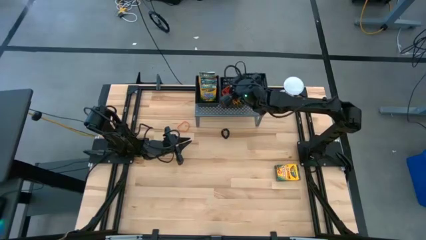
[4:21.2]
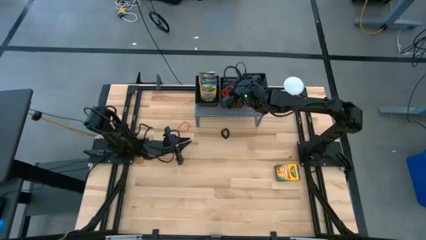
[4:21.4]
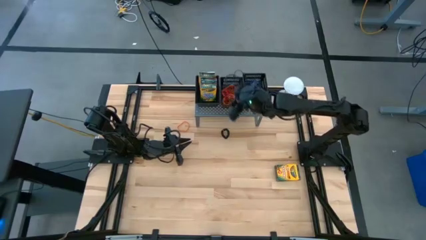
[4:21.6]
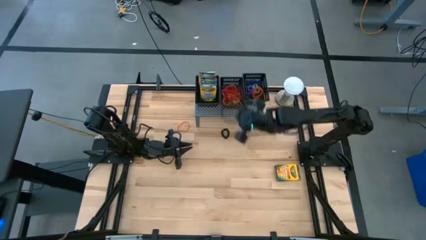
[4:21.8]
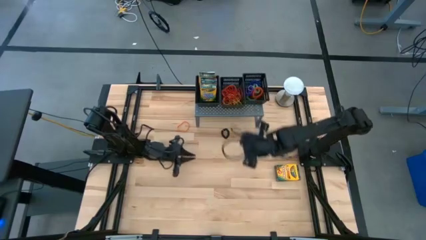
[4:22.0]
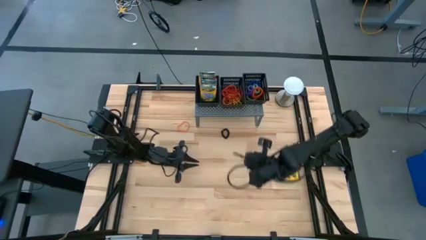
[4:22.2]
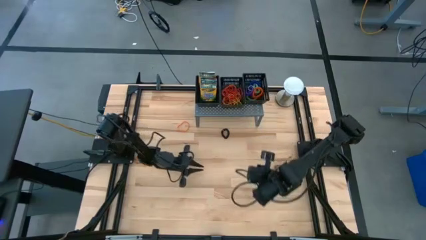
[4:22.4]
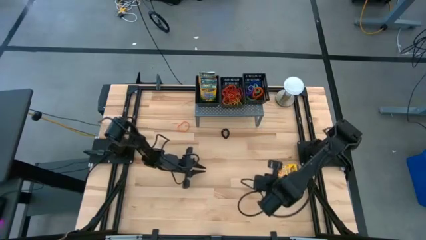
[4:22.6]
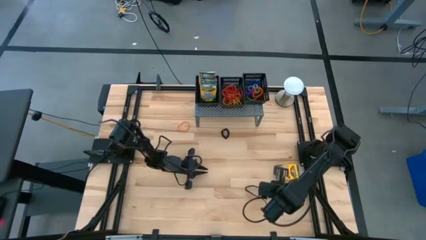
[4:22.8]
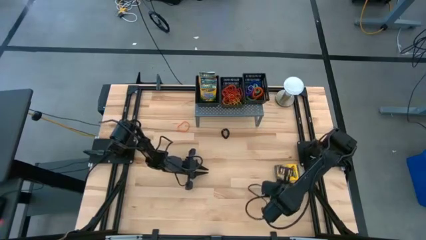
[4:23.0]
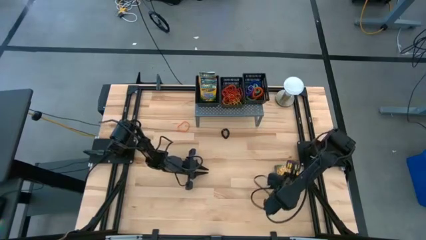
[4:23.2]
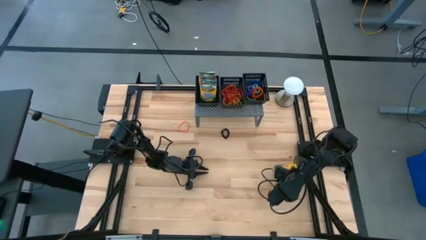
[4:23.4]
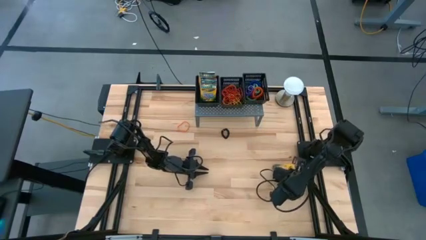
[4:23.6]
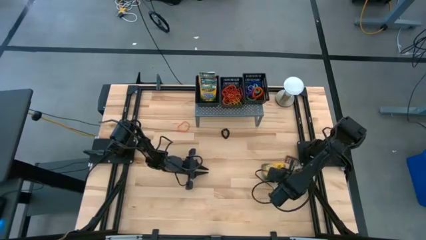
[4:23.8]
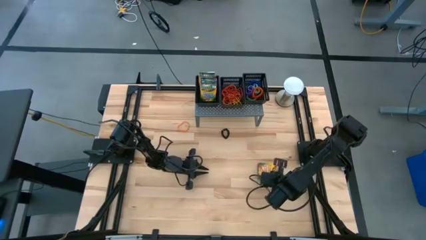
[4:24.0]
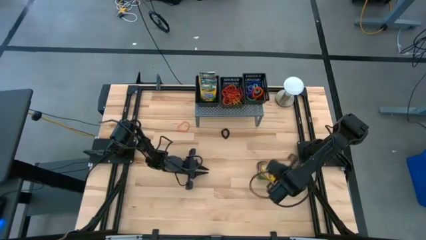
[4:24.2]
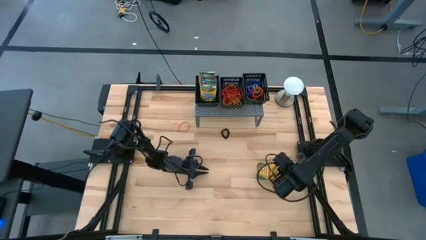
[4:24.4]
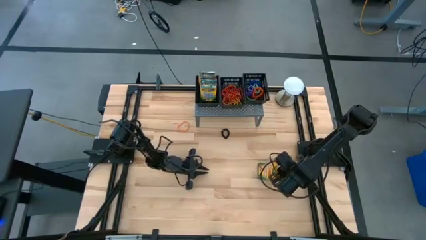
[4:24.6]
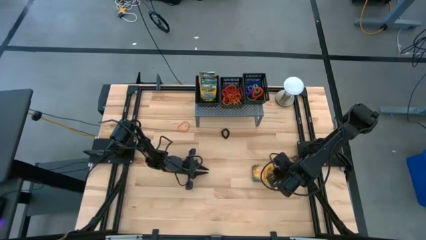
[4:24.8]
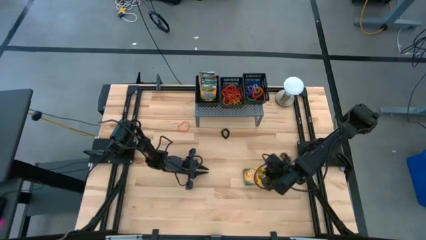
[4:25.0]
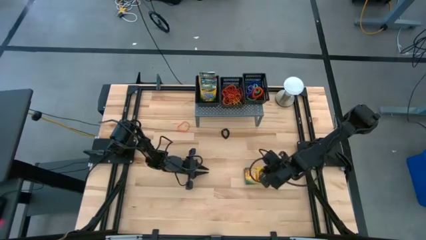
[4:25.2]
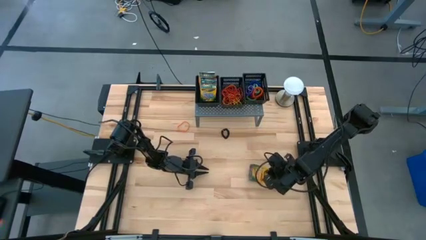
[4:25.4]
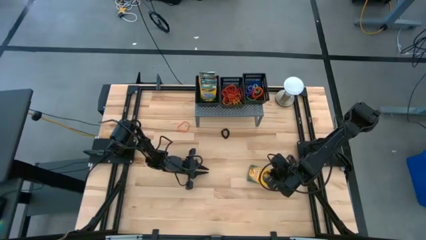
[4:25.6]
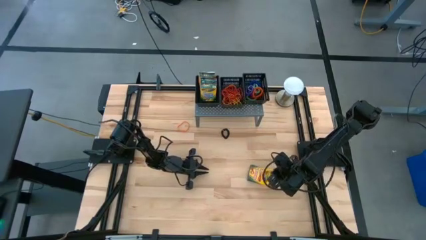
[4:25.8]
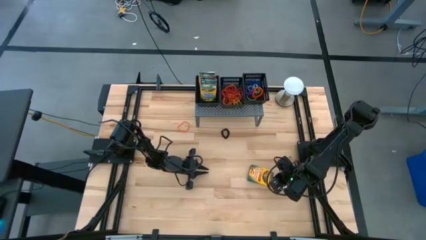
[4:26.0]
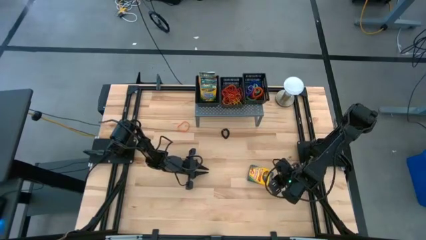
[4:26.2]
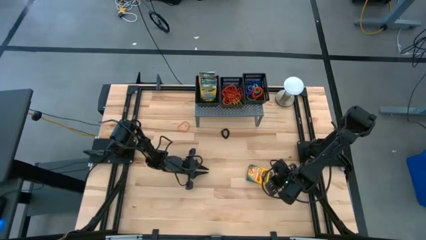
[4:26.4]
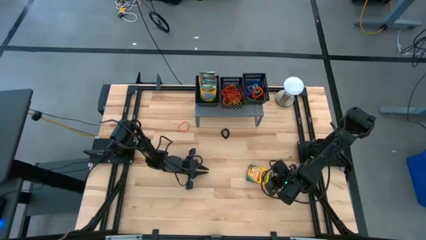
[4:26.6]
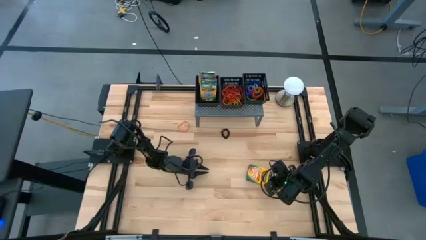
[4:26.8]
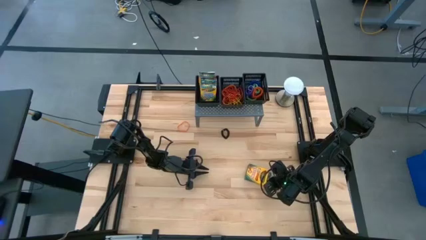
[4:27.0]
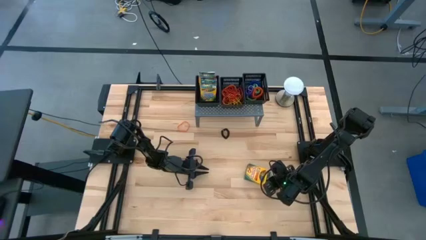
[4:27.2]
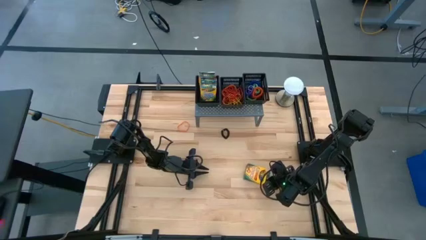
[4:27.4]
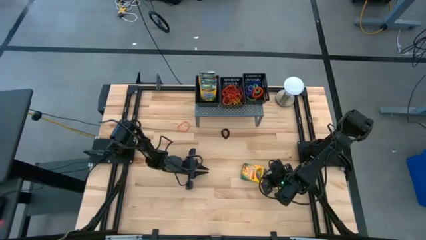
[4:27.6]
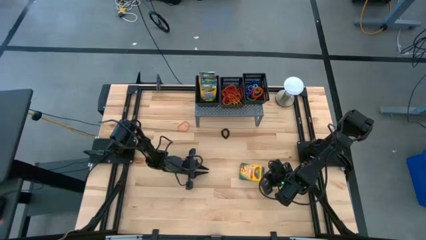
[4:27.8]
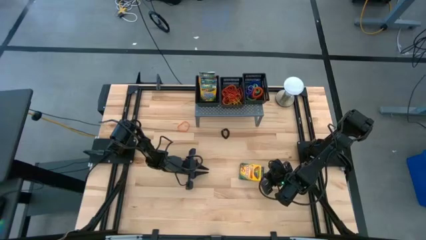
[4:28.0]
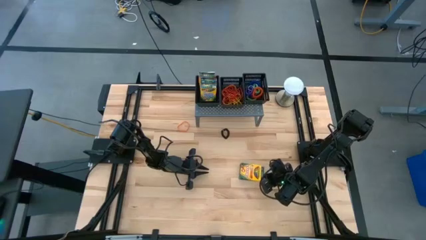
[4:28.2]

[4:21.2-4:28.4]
Task: Sort rubber bands into baskets
Put the crayon box into the left black basket on the shelf

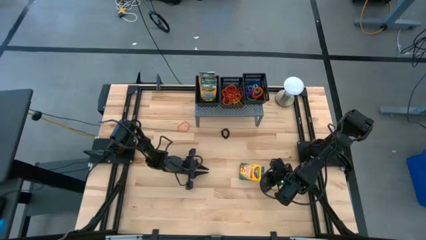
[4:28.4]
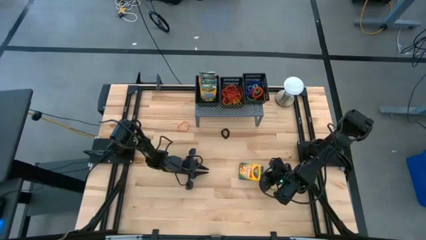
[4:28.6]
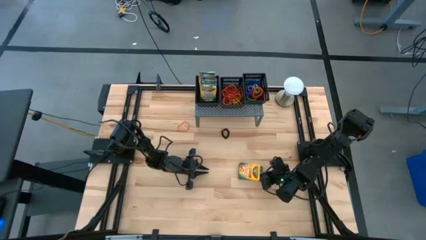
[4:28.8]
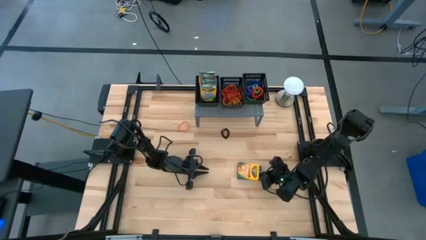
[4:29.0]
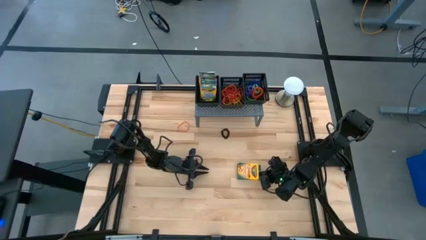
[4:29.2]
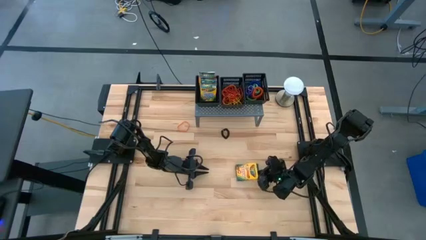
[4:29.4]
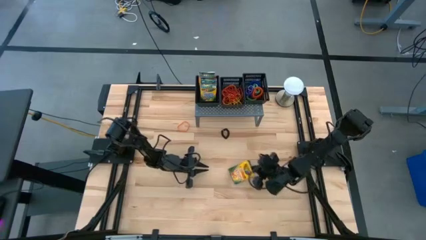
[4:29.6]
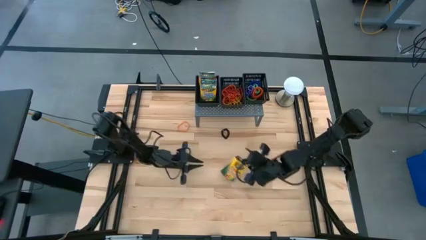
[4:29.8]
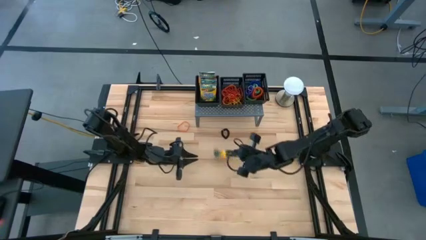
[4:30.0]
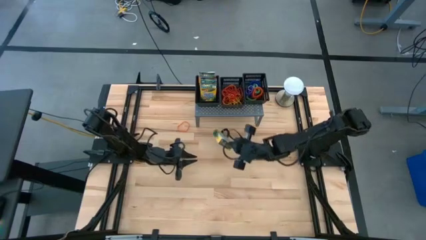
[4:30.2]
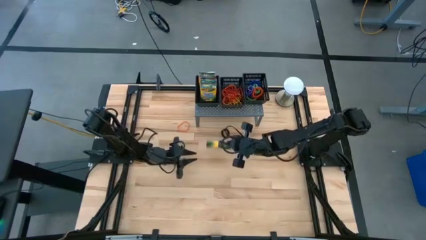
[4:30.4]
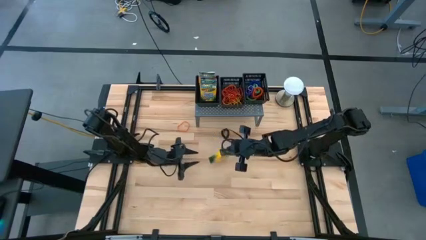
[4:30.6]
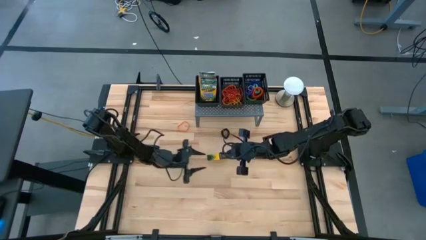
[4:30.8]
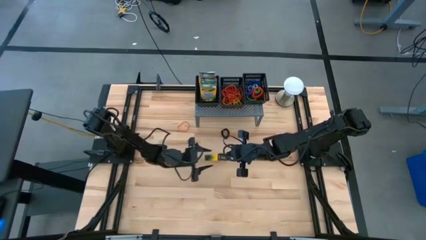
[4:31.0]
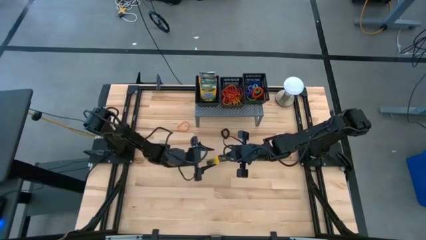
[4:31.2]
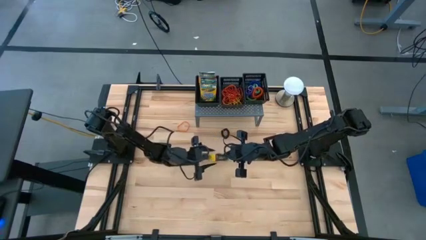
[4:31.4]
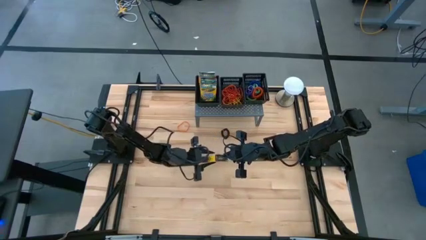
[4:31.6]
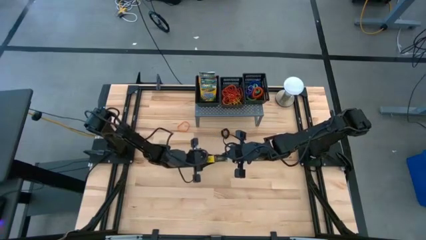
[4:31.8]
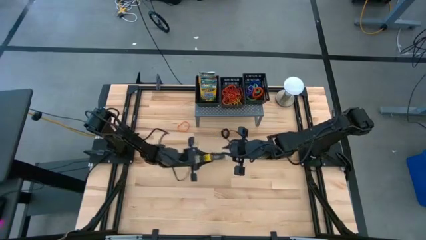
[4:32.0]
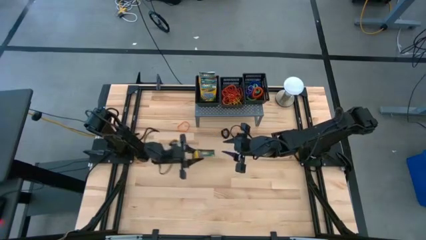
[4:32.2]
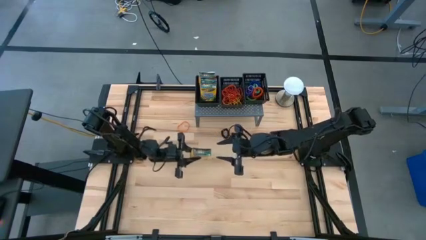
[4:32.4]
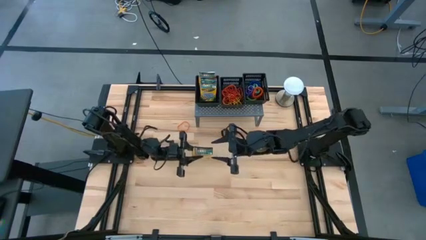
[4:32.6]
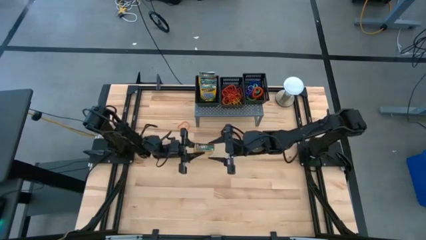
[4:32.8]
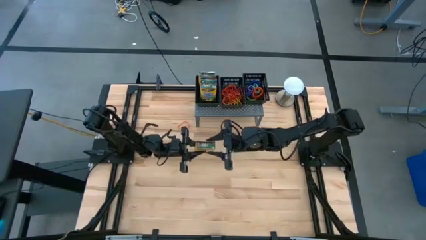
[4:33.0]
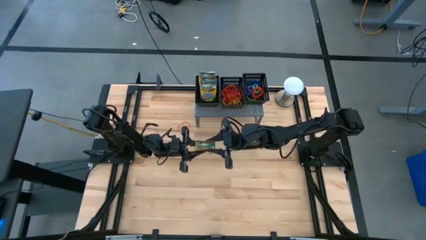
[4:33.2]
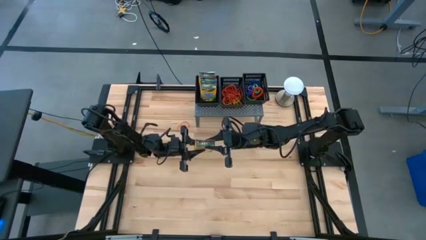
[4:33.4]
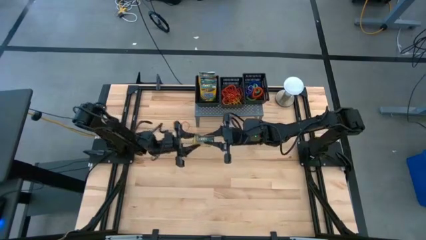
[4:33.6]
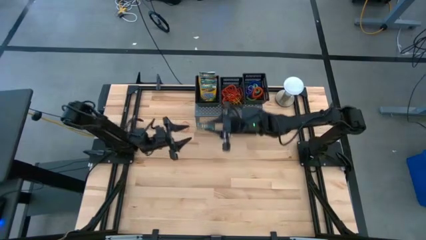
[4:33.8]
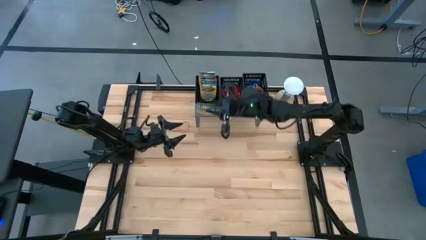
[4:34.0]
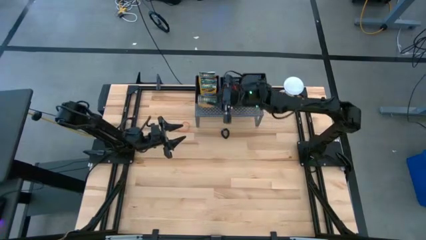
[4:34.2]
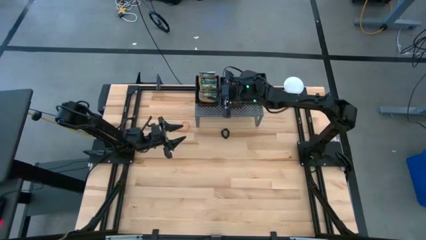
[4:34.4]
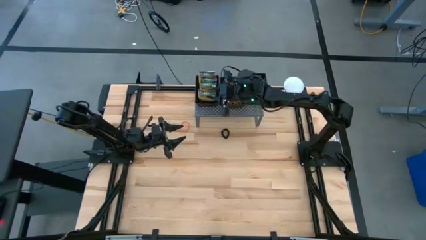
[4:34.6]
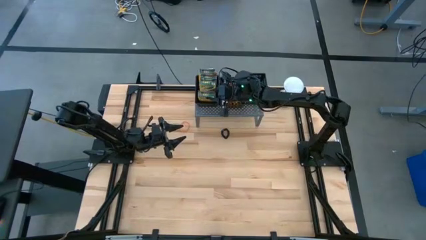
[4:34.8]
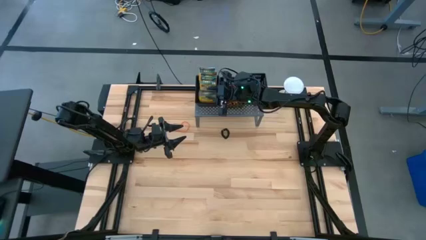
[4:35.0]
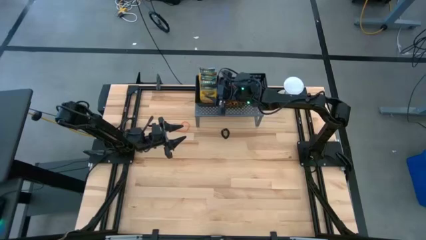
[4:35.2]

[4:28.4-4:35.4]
Put the crayon box into the left black basket on the shelf

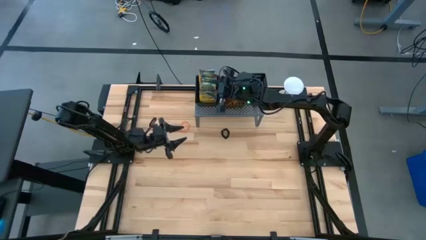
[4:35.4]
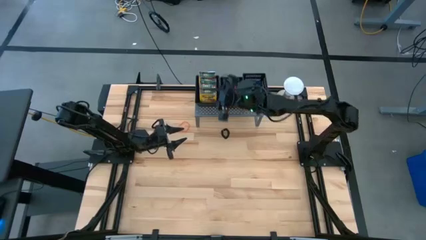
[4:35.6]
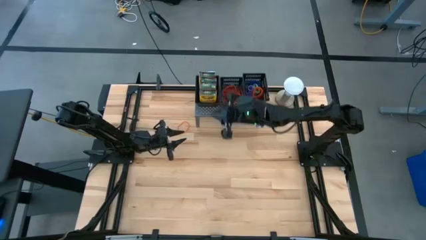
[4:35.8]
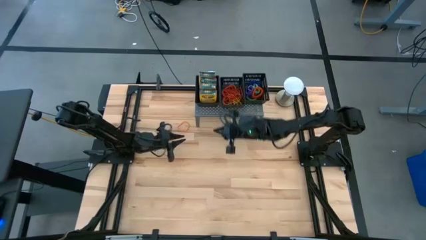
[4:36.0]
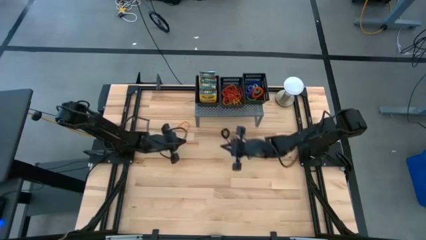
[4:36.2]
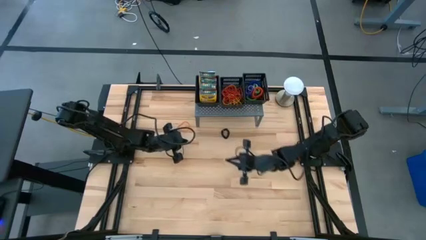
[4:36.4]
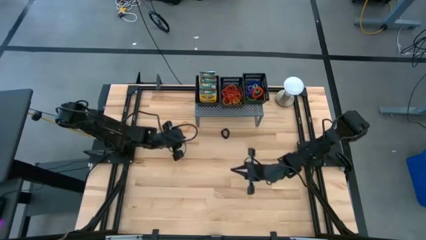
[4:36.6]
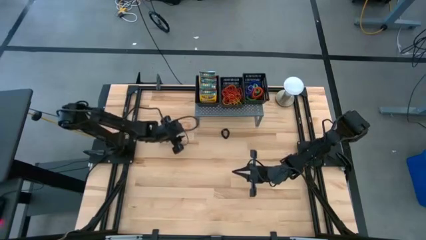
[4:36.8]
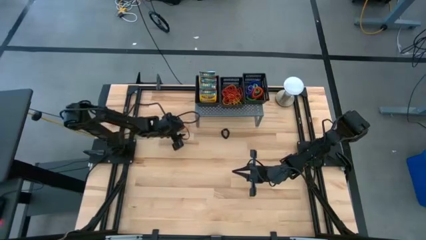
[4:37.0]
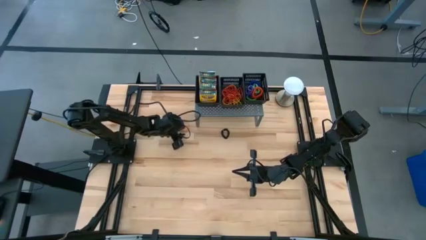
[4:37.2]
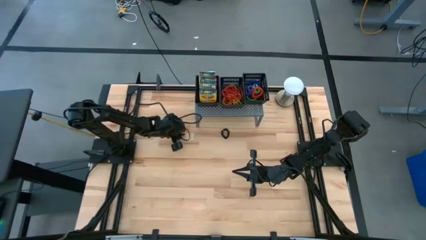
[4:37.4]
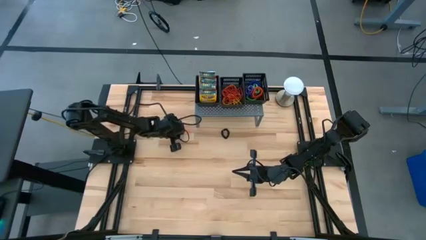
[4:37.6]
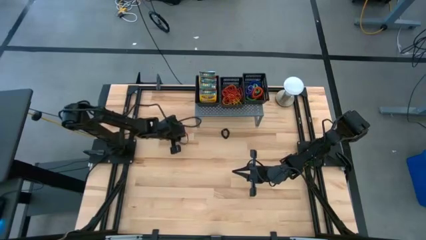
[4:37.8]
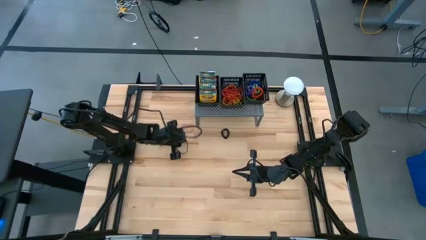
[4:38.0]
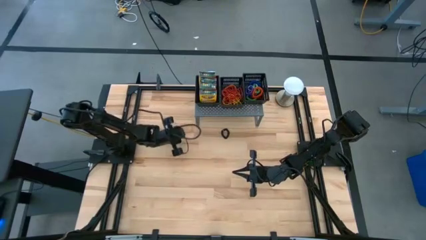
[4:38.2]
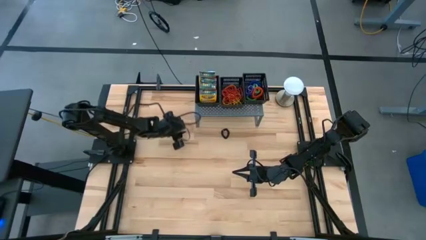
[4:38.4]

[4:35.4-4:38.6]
Put the orange rubber band into the middle black basket on the shelf
